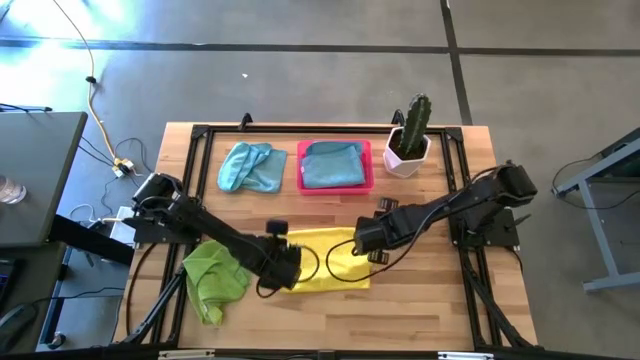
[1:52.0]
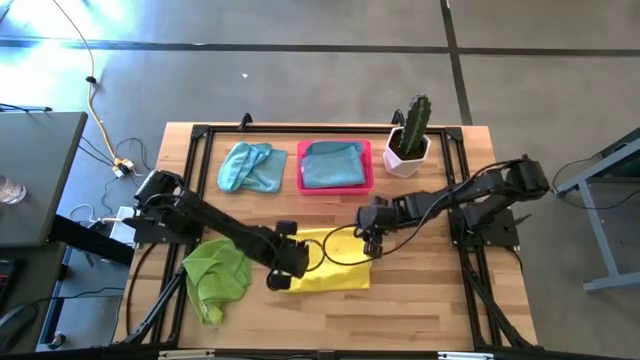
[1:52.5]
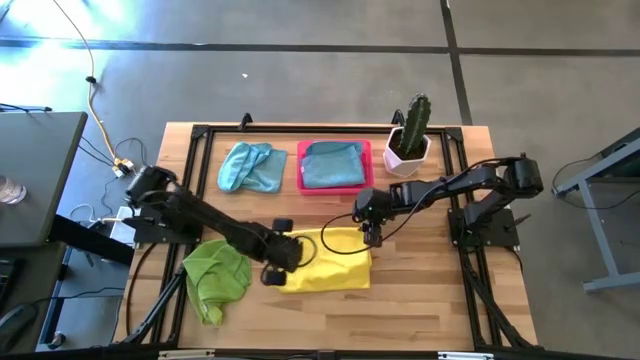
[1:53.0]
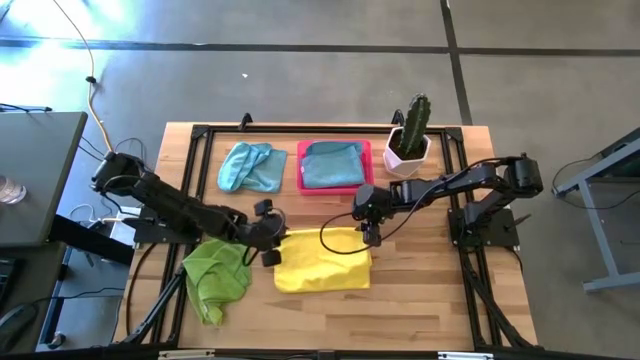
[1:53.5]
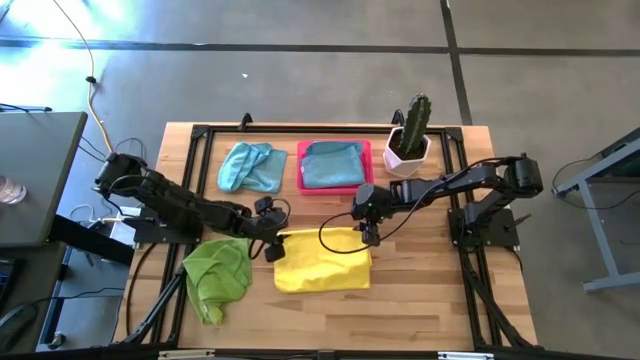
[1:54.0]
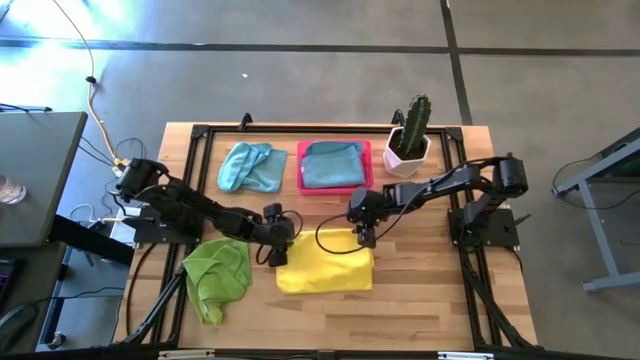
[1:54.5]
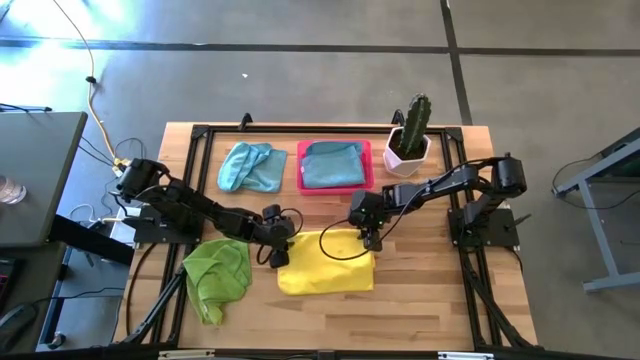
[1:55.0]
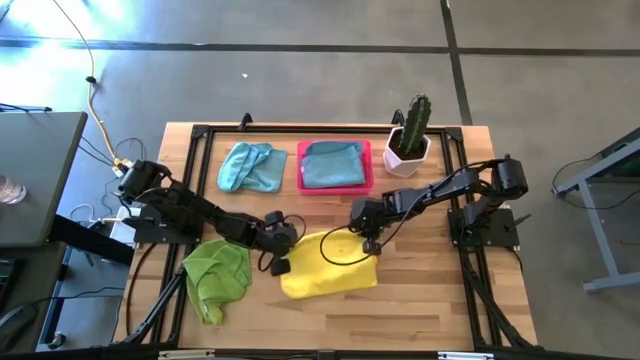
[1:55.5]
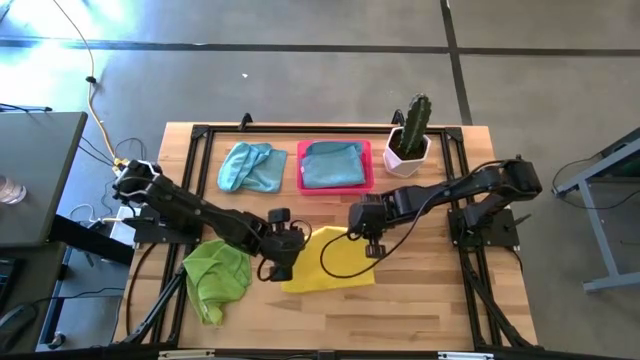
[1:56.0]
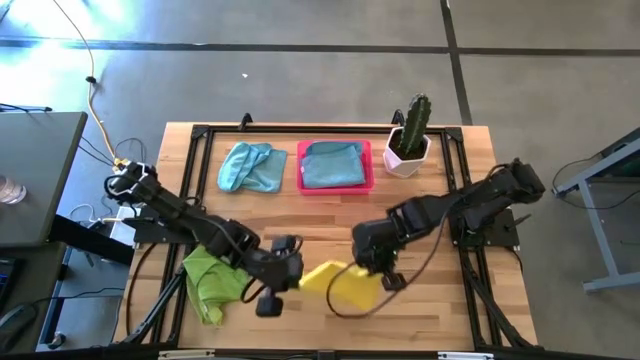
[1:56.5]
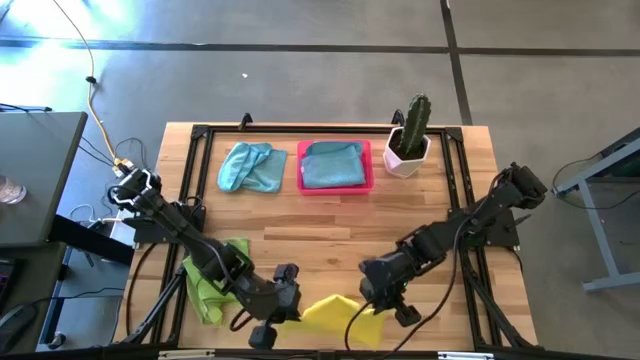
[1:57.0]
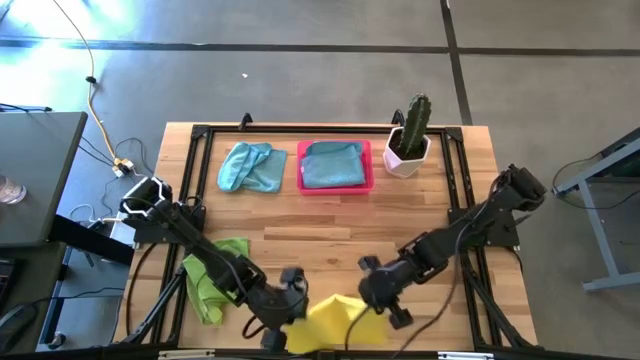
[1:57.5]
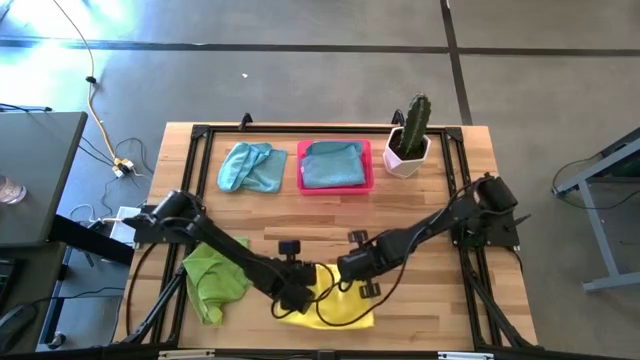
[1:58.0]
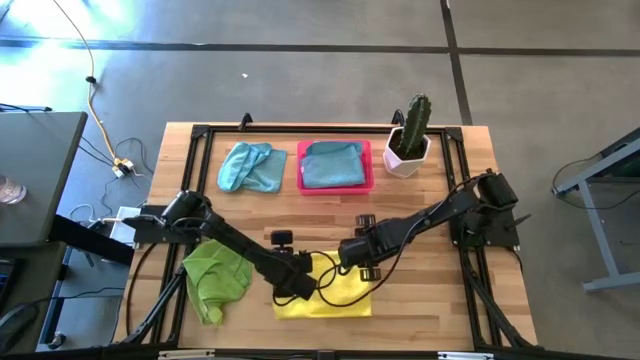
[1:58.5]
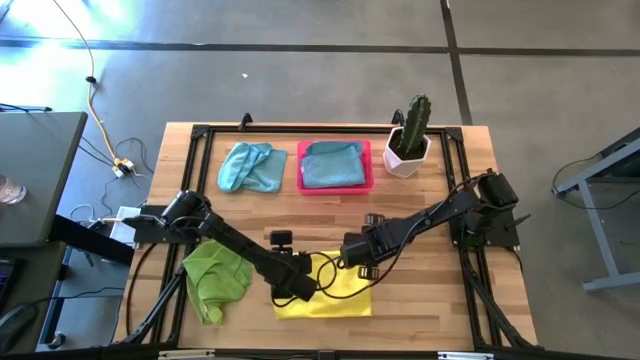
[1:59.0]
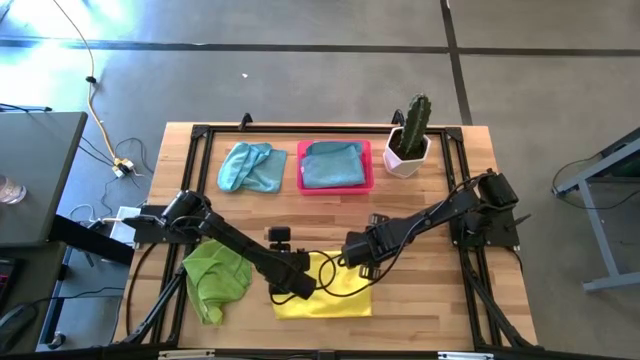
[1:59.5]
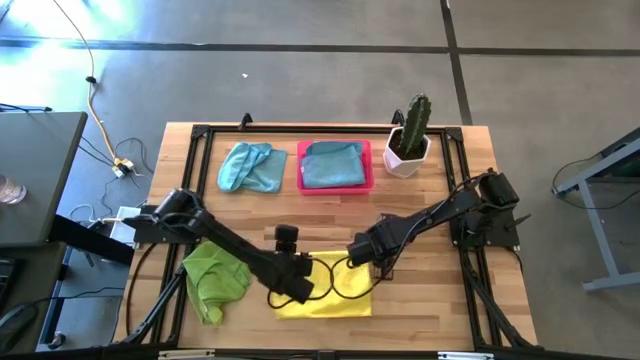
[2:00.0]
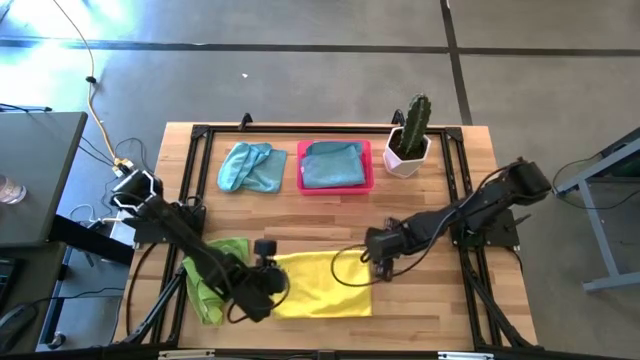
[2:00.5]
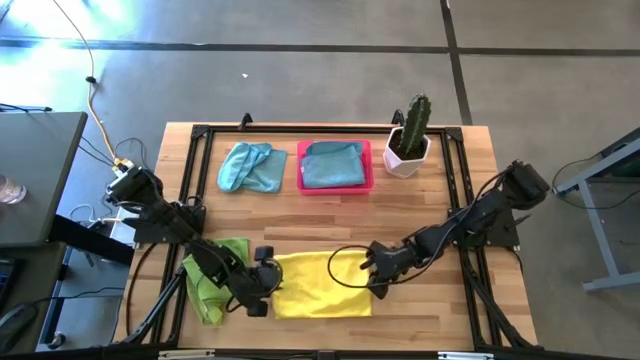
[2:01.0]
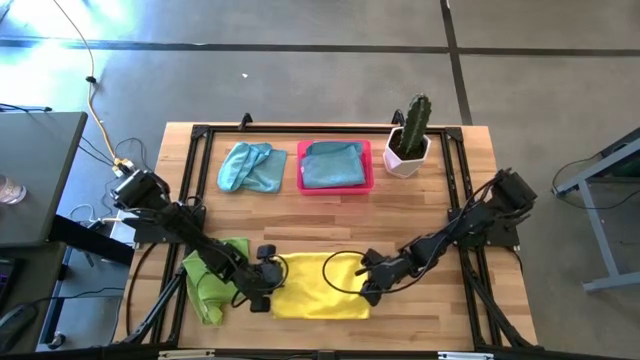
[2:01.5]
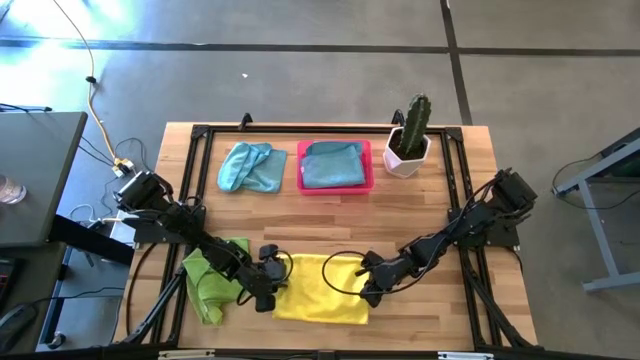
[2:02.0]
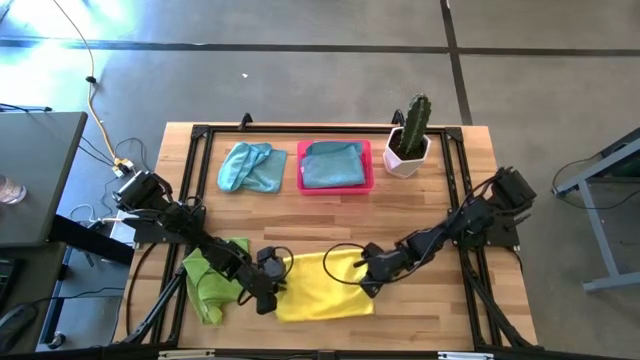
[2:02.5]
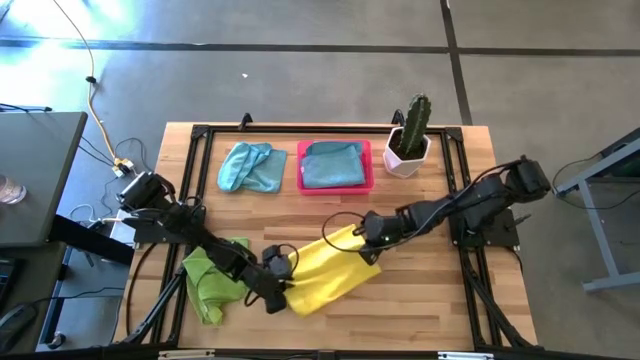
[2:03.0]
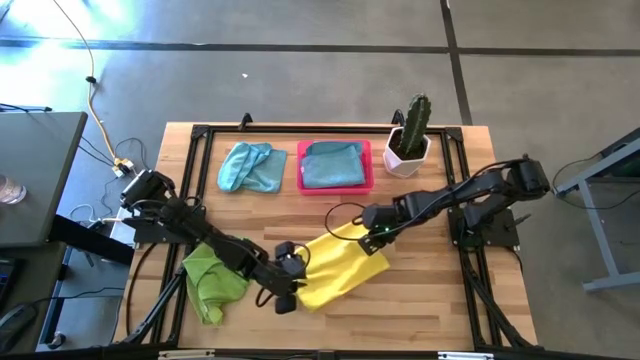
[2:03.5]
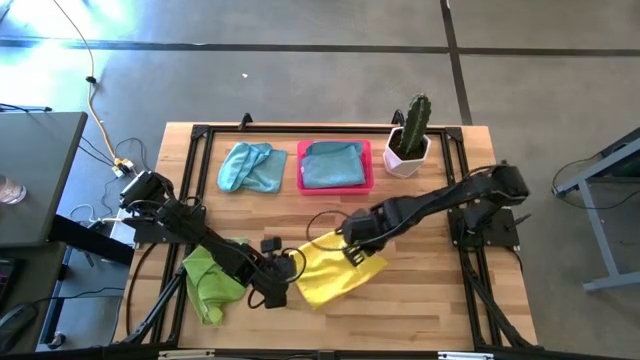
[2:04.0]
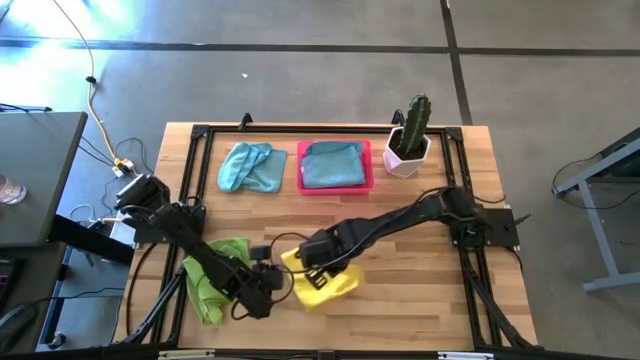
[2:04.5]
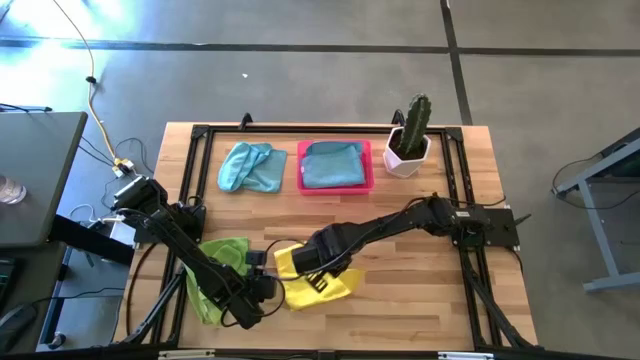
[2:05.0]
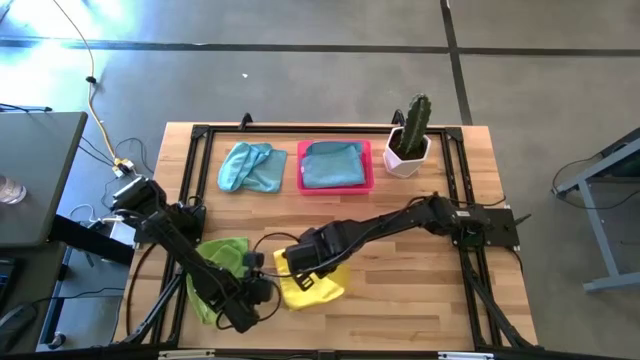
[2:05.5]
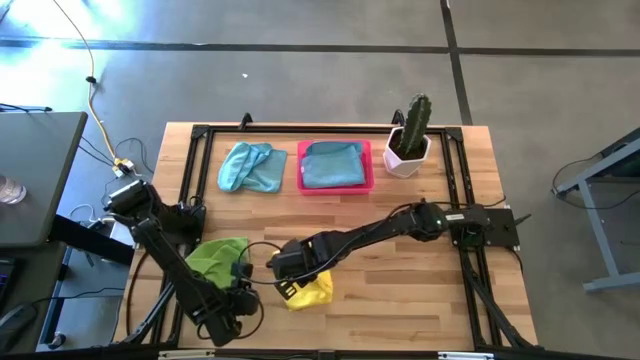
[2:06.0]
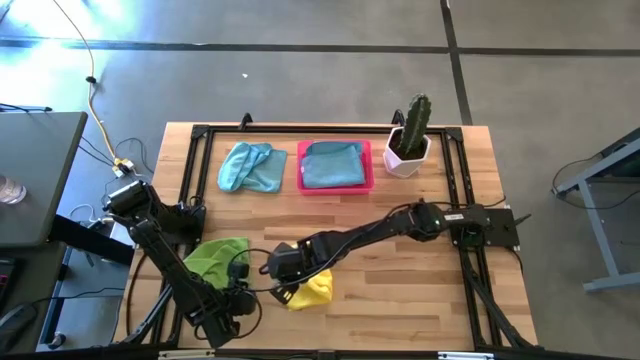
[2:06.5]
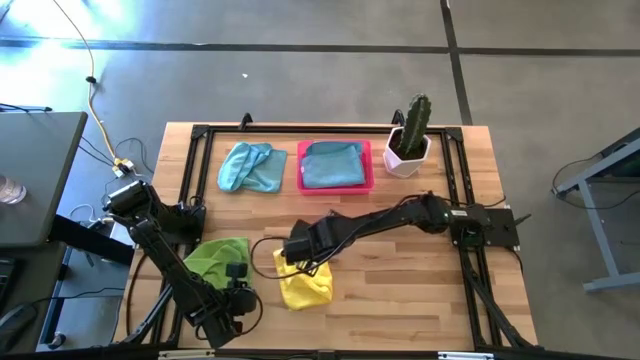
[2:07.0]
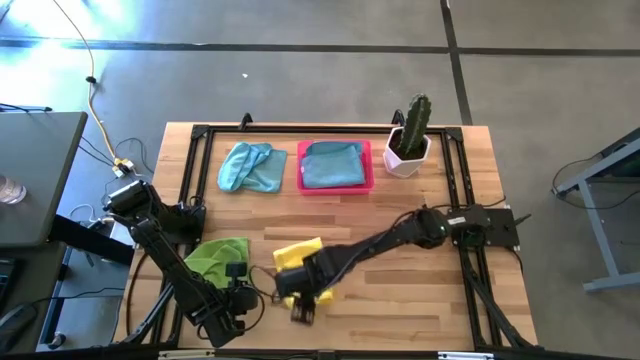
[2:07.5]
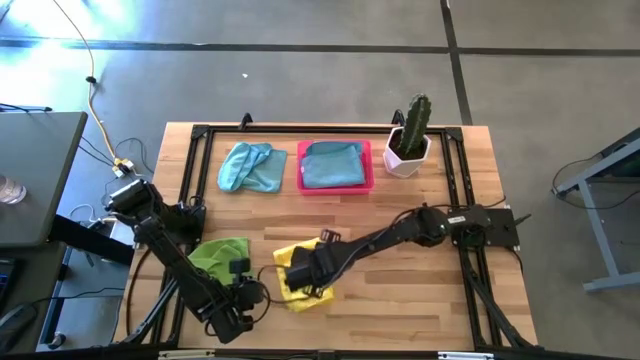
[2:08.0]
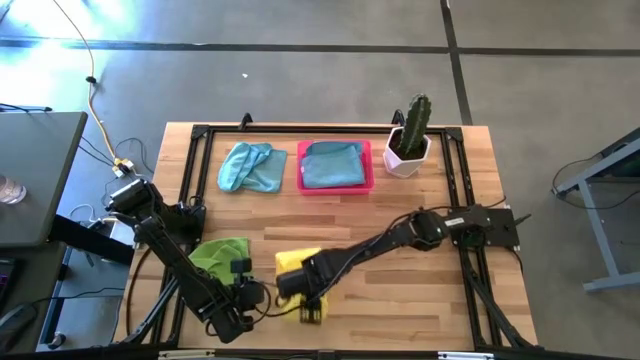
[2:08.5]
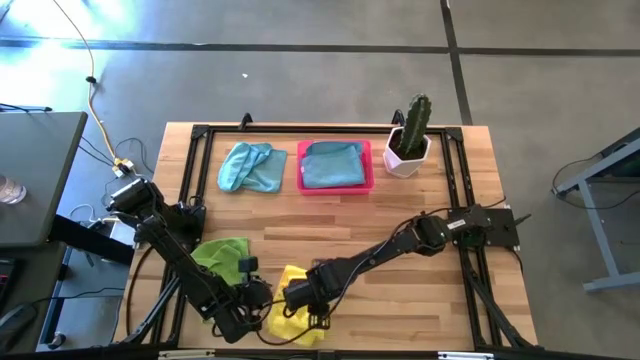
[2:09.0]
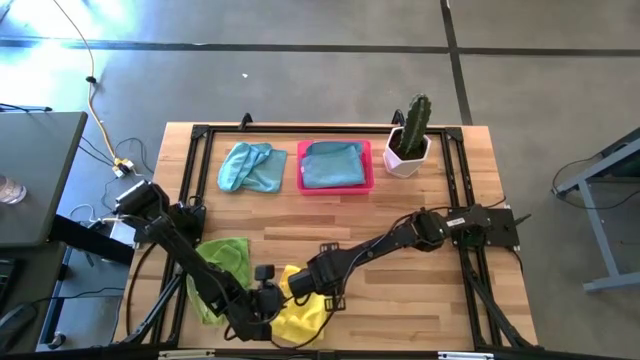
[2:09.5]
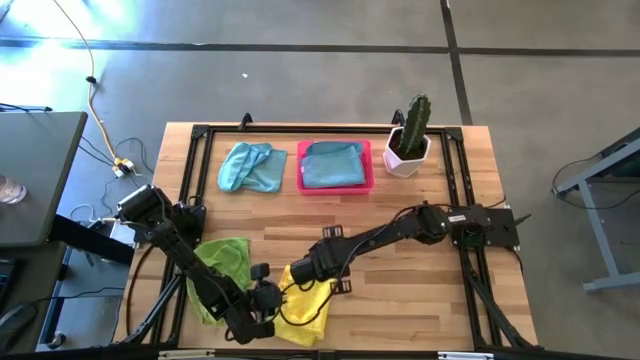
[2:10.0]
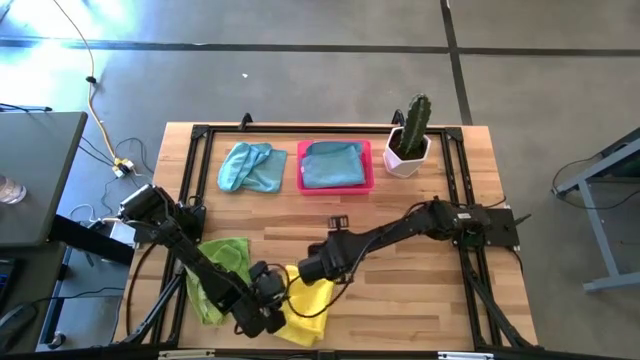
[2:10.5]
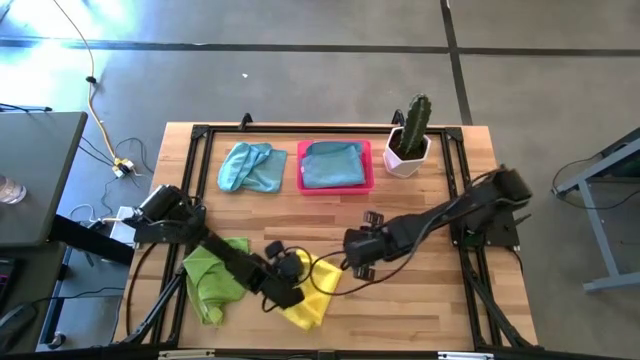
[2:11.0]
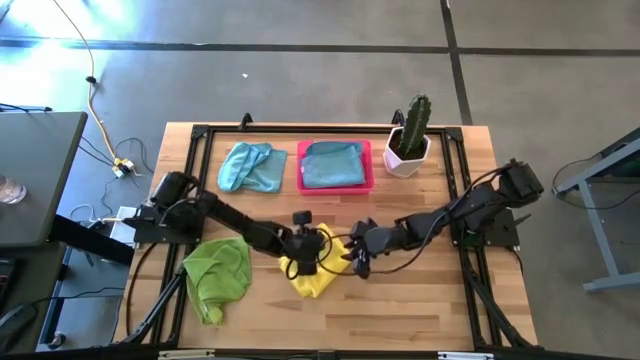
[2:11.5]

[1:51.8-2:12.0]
Task: Fold microfiber towels
Fold the yellow microfiber cloth
